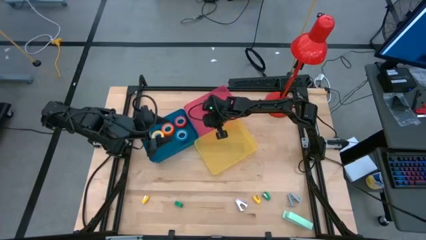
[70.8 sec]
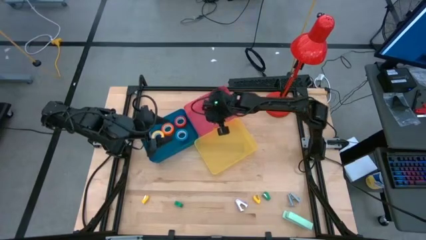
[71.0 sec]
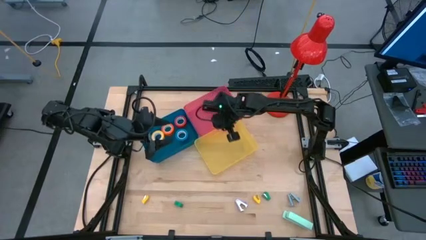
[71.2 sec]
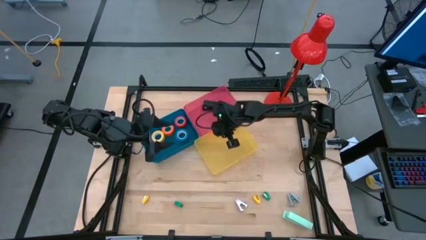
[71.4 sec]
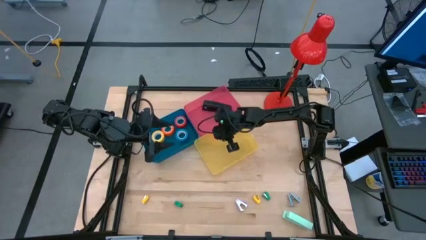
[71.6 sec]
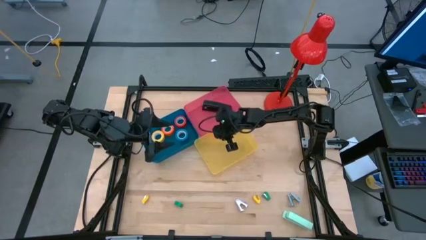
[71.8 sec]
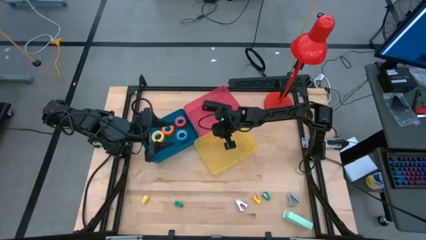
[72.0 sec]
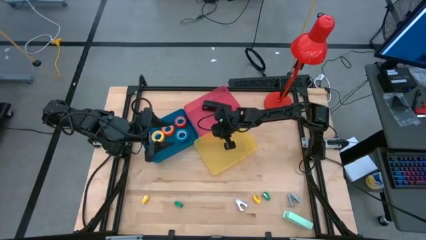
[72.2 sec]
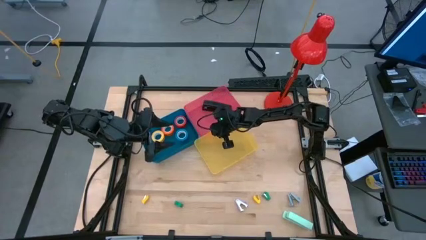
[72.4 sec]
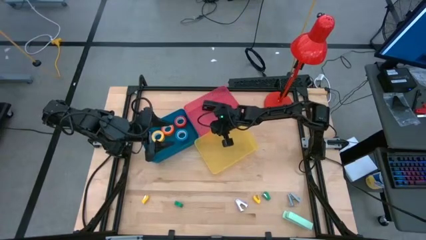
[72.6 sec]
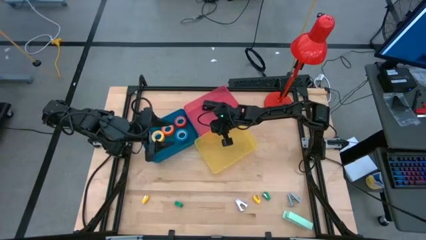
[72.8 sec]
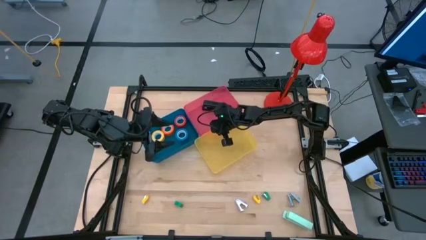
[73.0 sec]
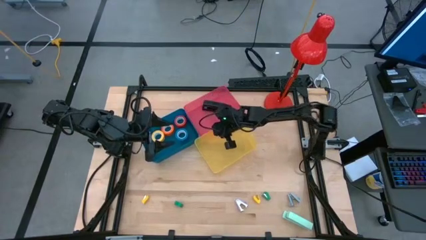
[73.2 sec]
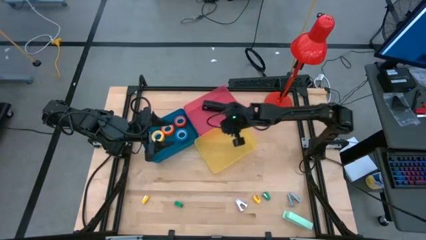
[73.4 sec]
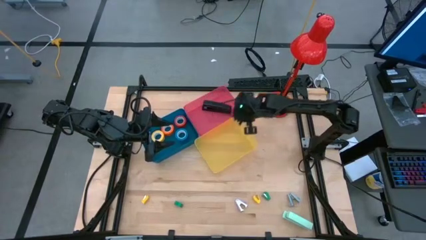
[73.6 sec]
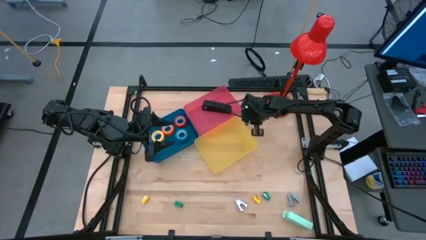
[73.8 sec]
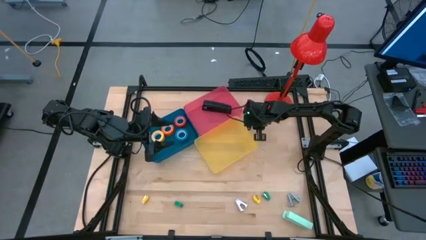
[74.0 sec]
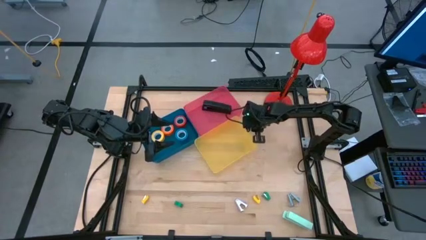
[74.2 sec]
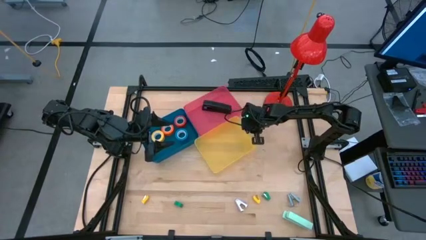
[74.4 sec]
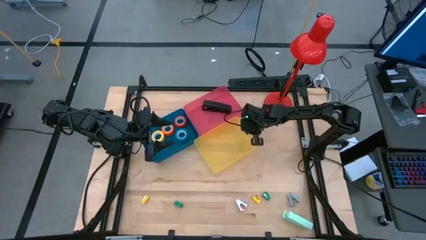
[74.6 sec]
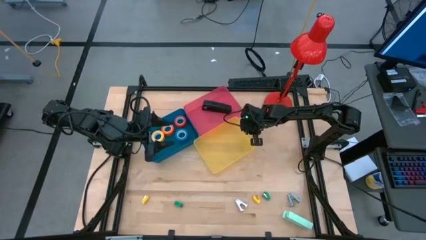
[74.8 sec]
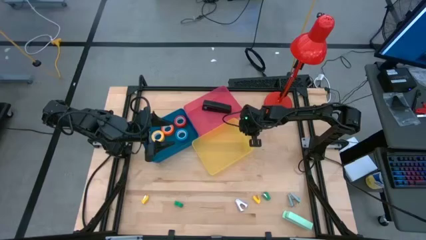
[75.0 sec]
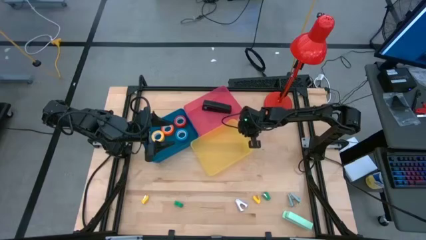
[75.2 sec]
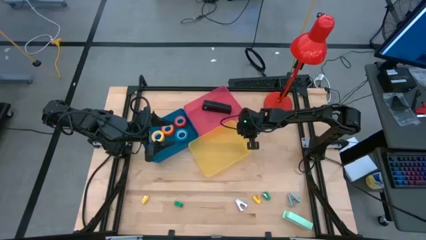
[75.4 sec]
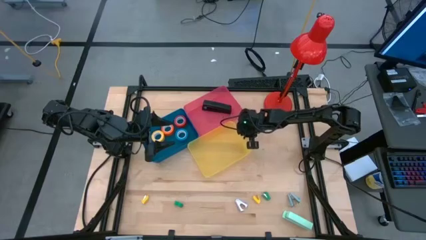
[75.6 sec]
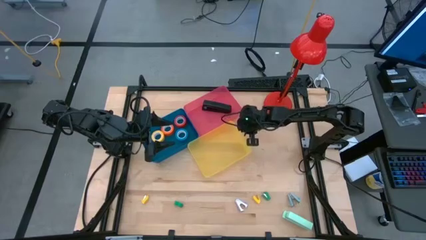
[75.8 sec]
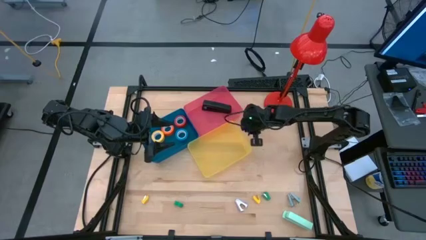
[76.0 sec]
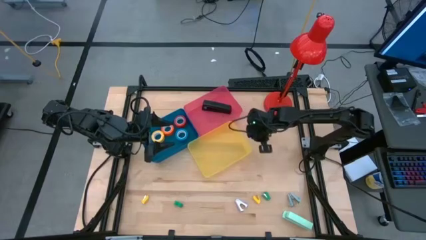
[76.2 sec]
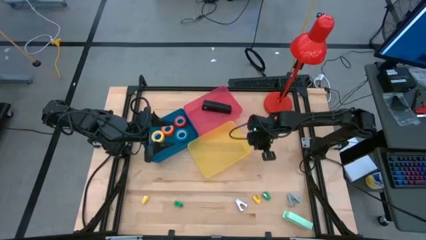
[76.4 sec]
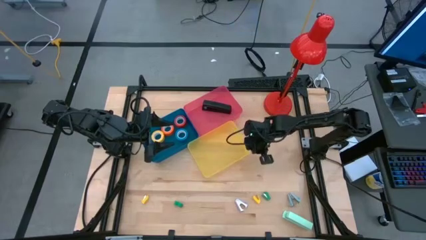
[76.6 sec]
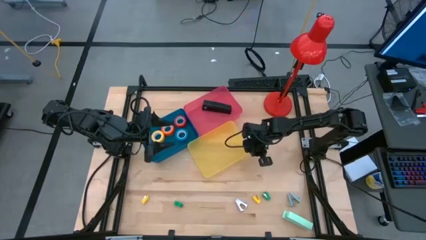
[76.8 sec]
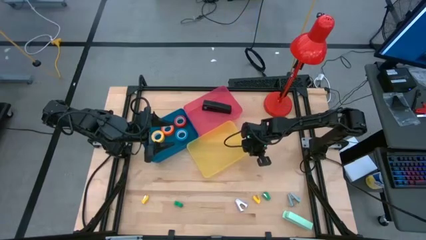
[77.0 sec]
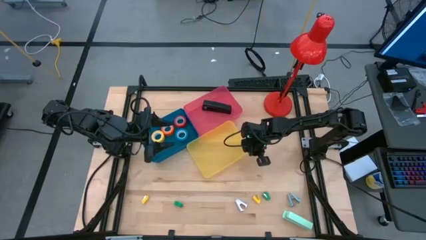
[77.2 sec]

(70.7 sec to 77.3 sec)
Task: Pick and place Stapler, Stapler remover, tape
Adjust the yellow bin

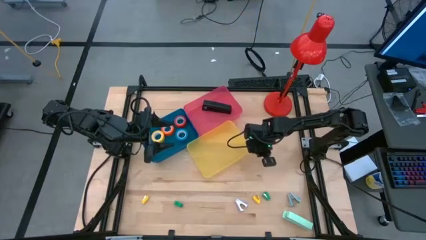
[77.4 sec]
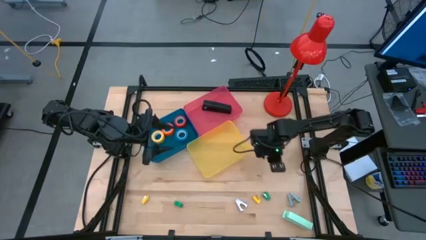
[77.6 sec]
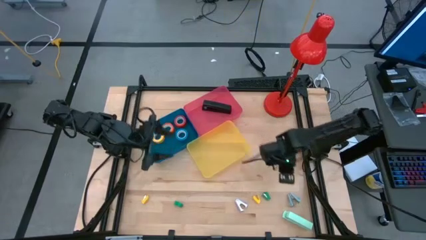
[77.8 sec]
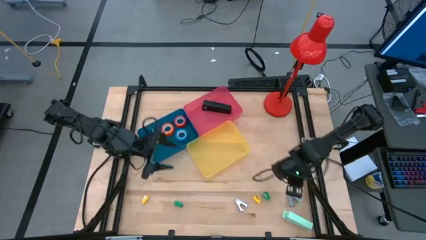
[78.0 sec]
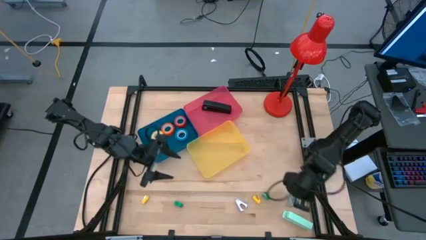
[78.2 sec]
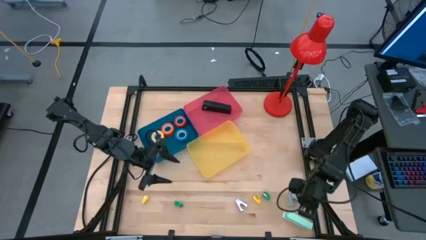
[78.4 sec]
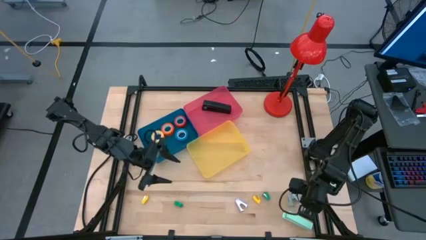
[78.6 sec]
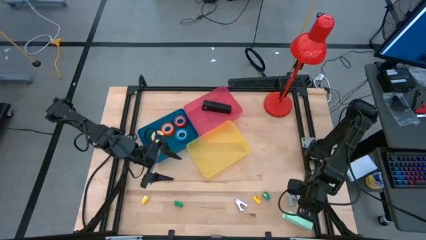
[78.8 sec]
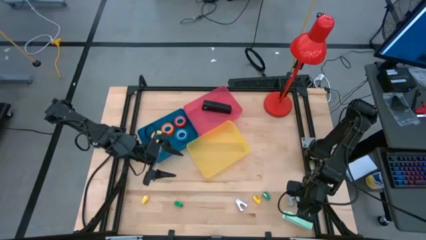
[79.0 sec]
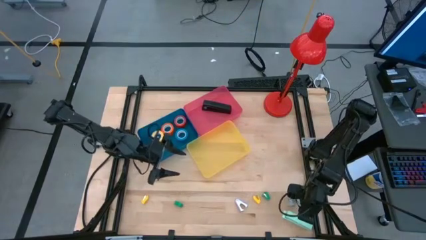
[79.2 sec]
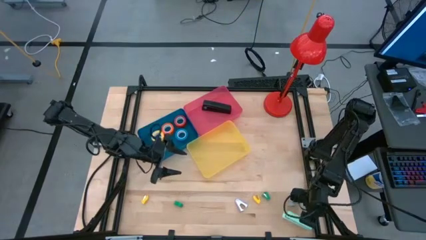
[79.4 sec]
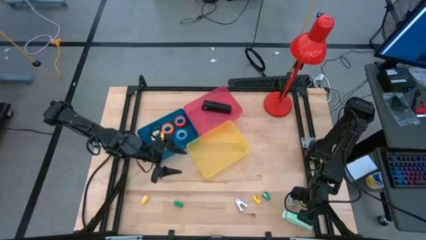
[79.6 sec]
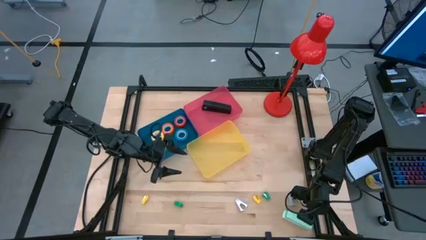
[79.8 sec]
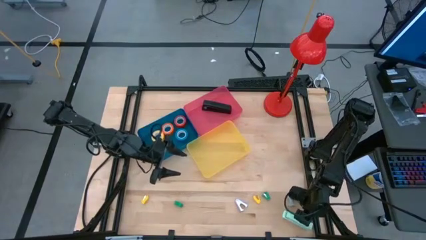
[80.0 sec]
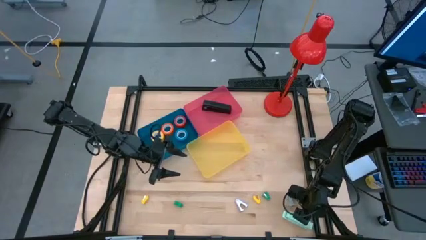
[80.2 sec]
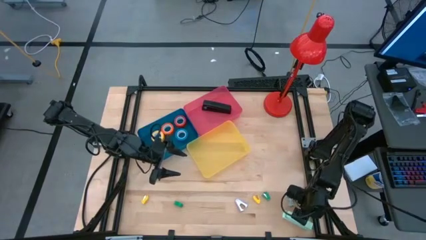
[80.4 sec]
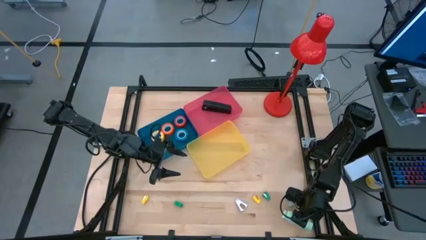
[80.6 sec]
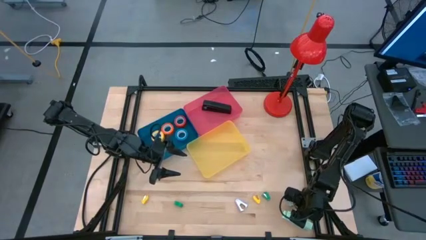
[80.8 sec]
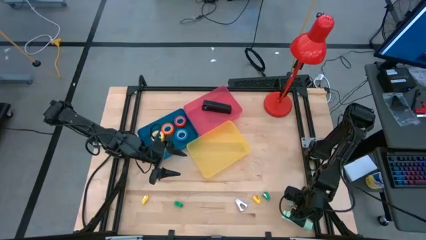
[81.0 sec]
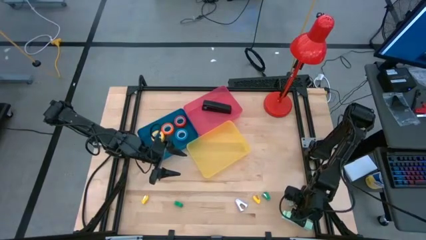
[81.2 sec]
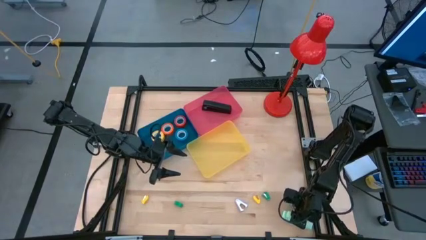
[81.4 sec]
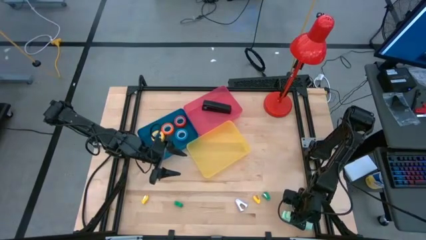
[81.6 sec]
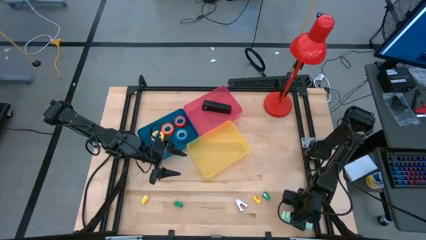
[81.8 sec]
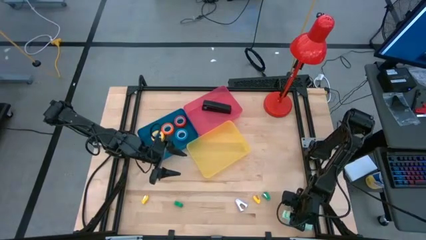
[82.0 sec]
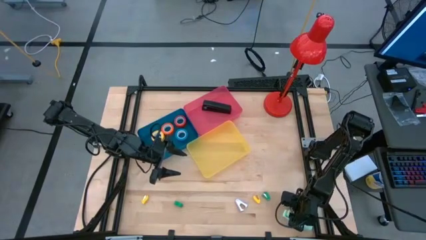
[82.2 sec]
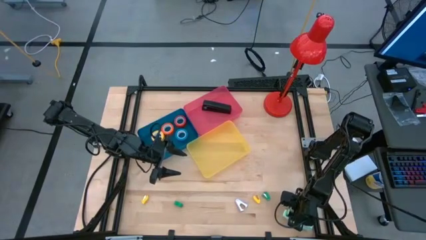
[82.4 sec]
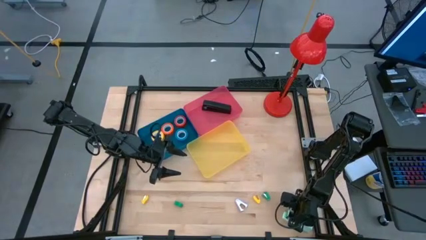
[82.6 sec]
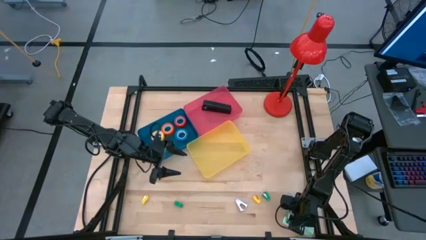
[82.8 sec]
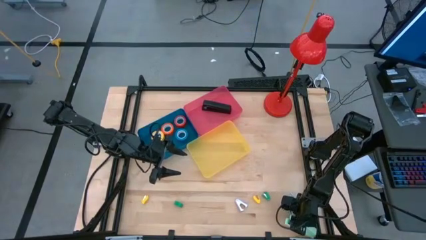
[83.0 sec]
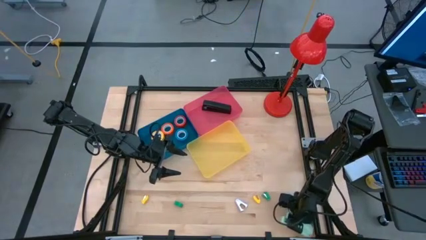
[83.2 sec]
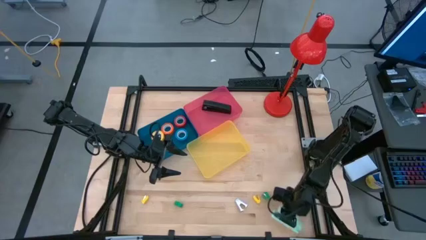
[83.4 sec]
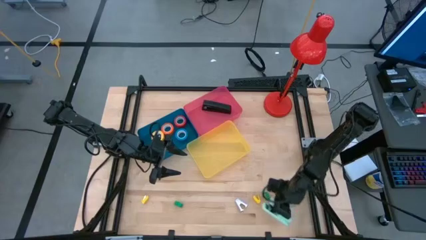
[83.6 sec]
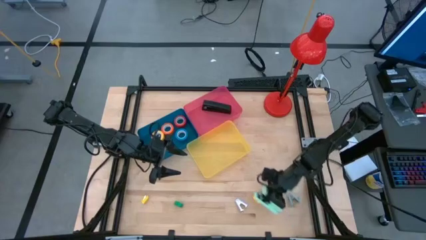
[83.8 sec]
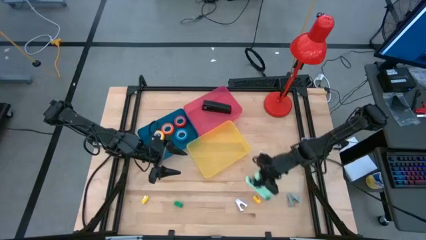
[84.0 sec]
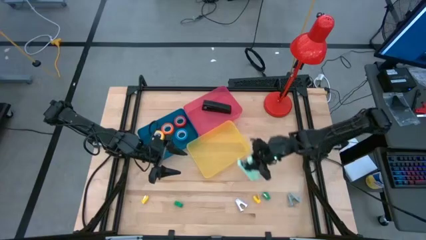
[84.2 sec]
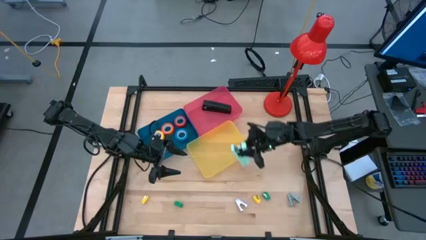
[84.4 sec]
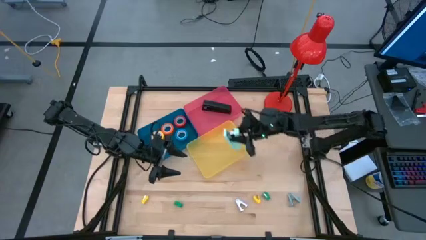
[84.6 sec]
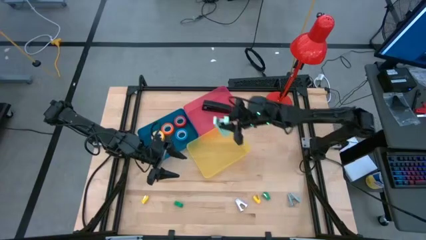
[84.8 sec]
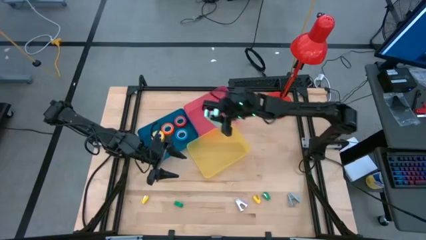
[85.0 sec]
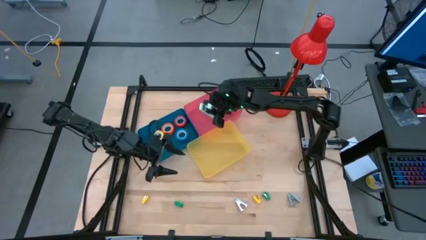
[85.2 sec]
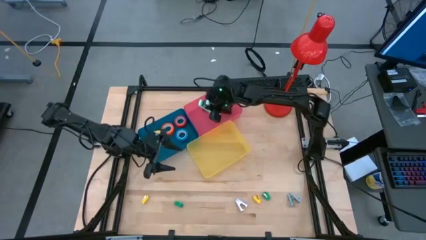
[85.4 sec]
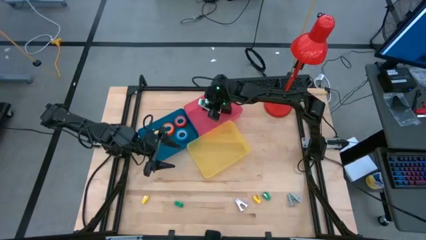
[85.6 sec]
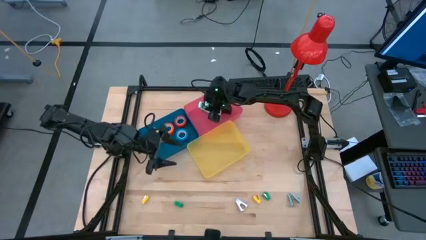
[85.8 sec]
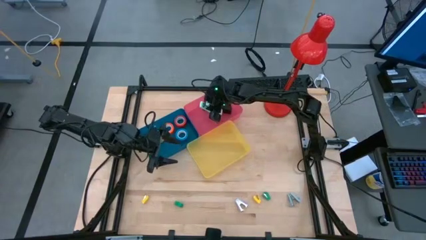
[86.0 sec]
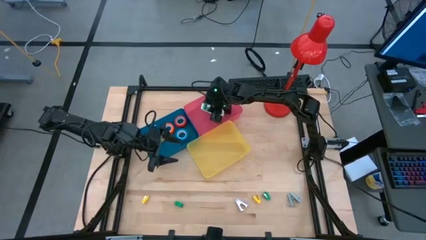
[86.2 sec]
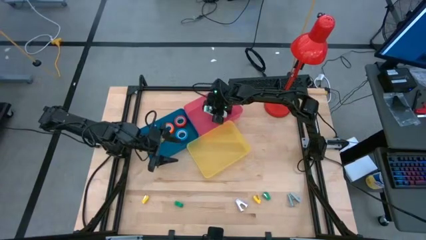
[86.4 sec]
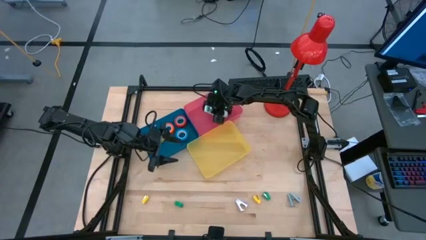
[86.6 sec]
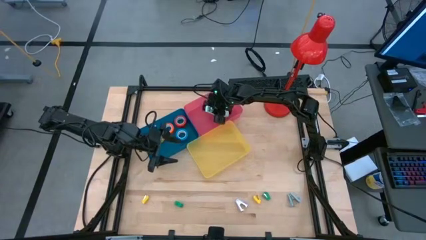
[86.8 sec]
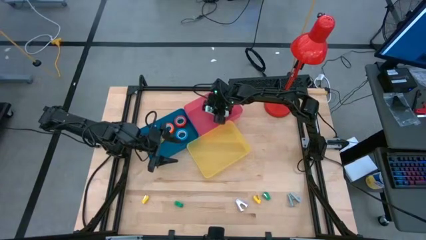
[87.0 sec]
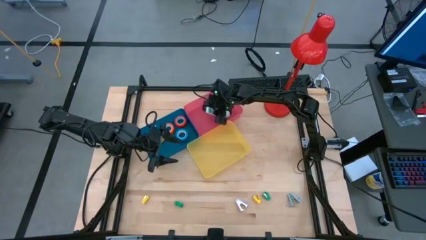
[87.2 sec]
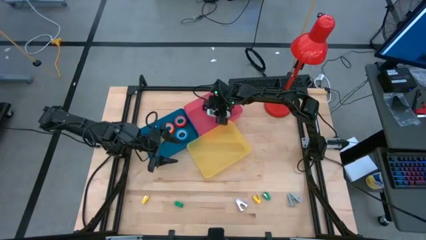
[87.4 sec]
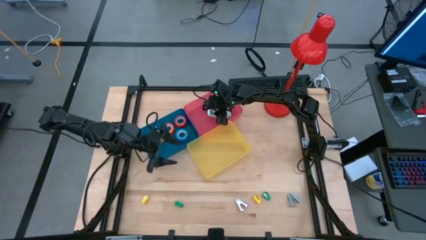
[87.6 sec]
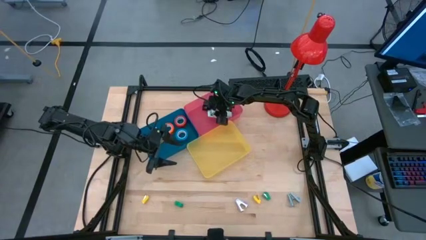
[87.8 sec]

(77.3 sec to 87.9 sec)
Put the light blue stapler into the pink bin
